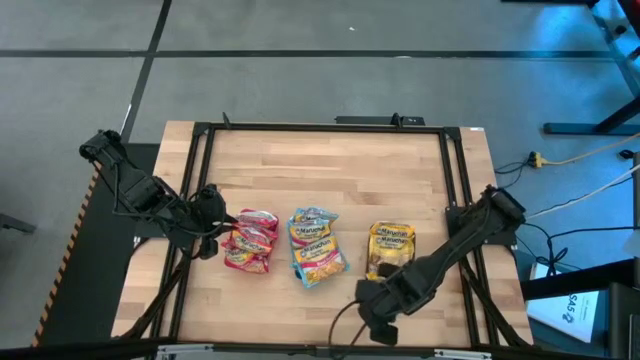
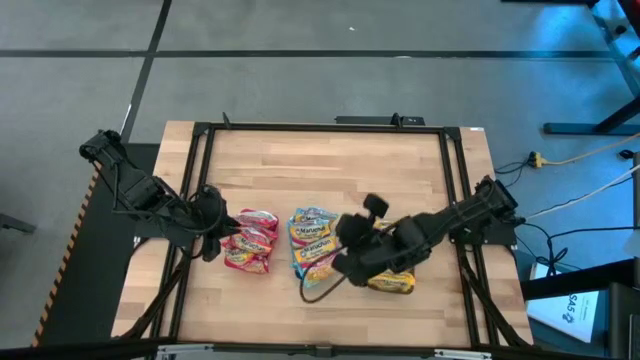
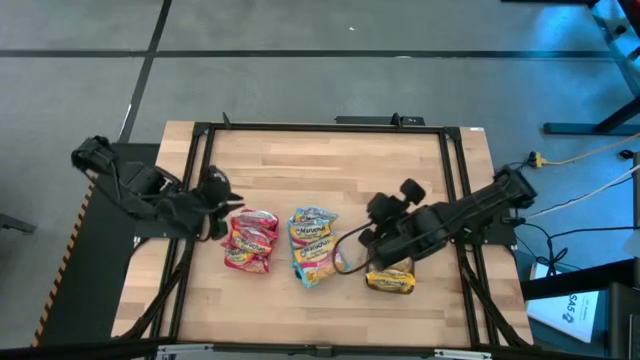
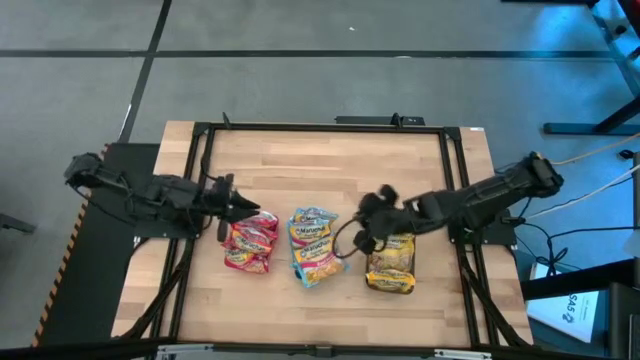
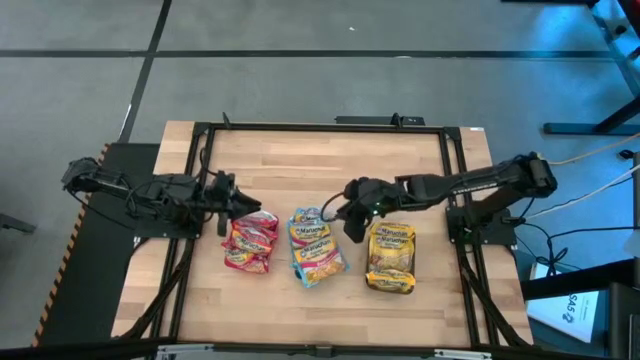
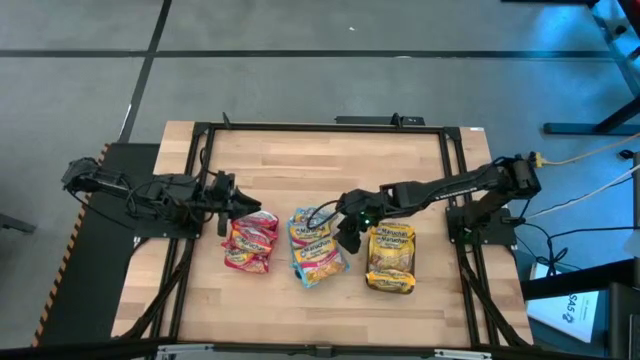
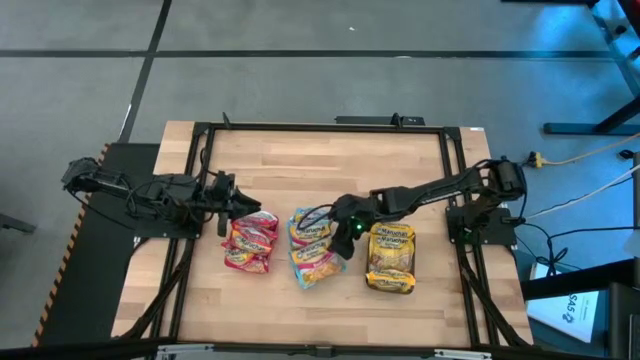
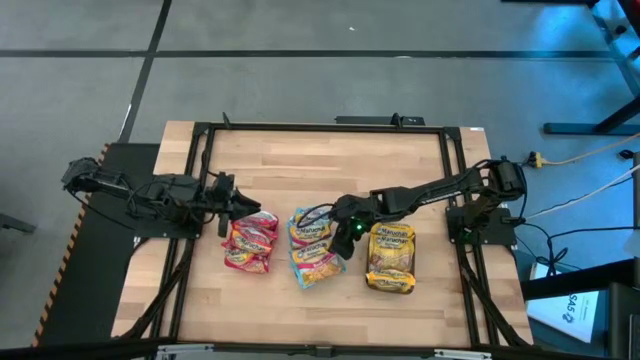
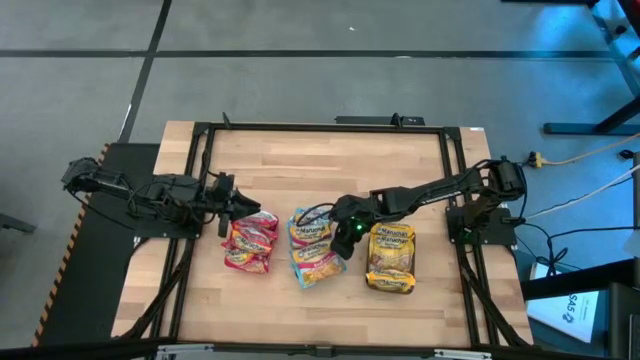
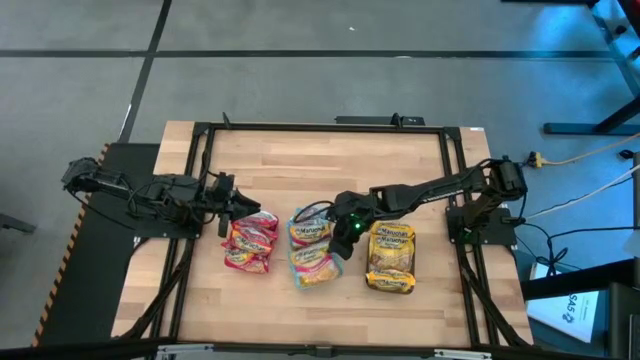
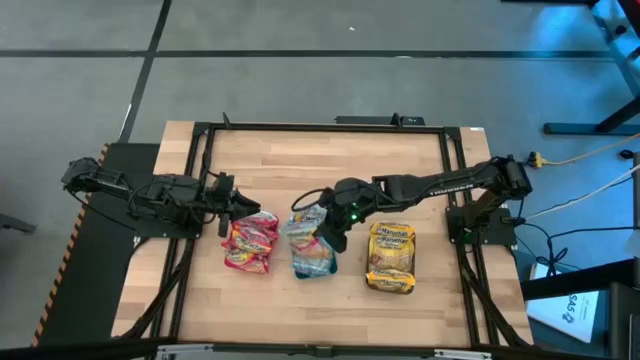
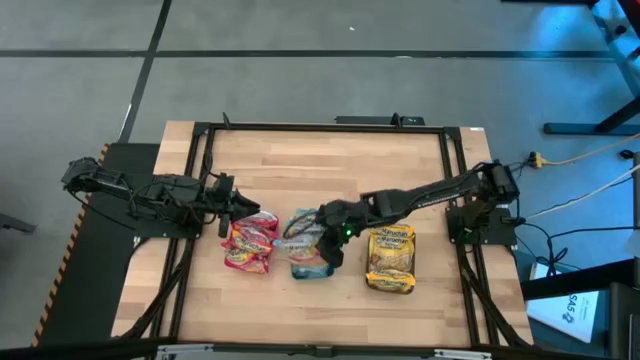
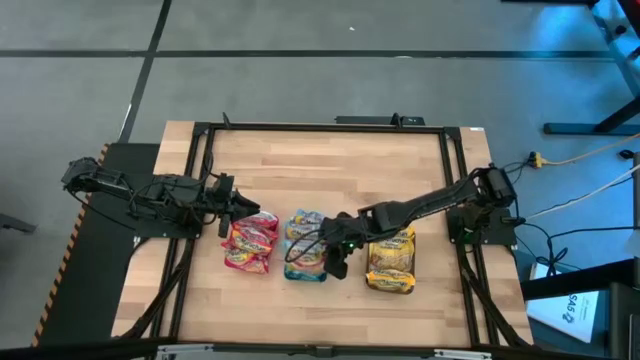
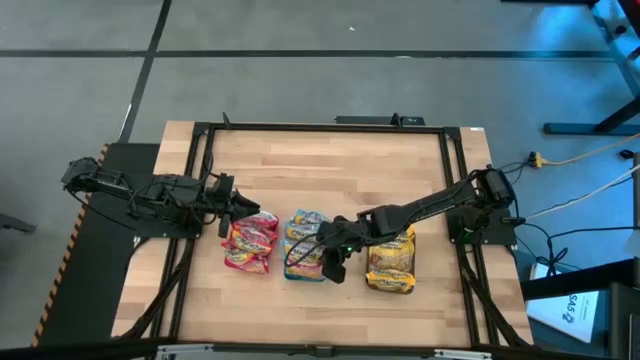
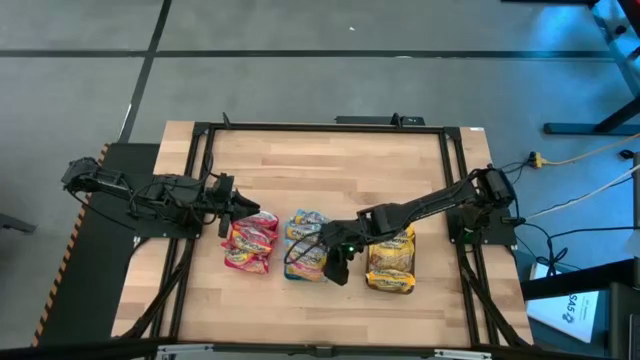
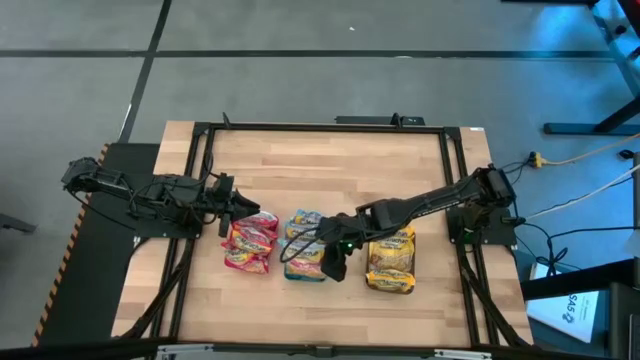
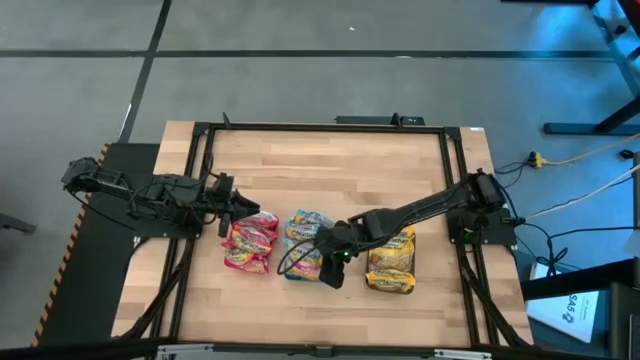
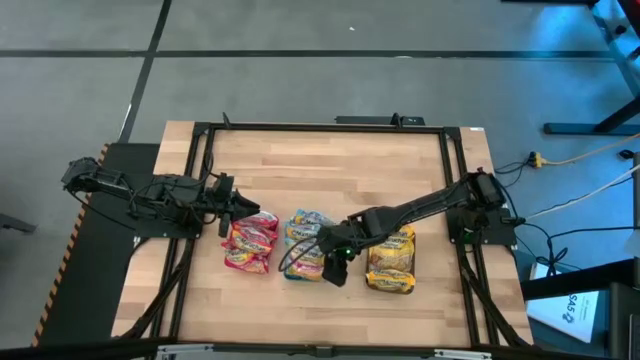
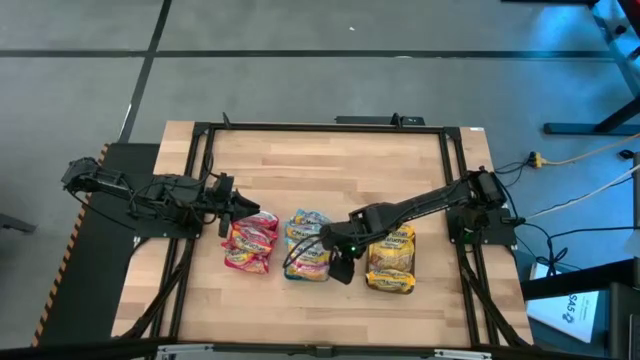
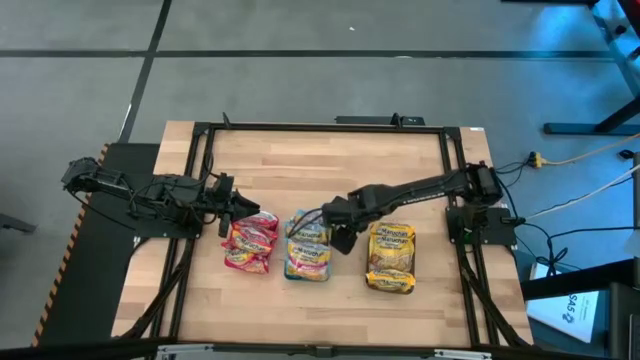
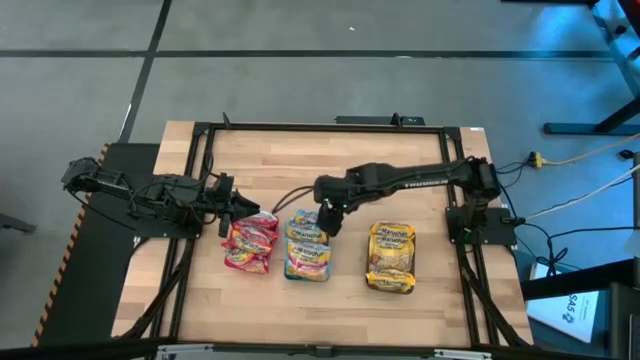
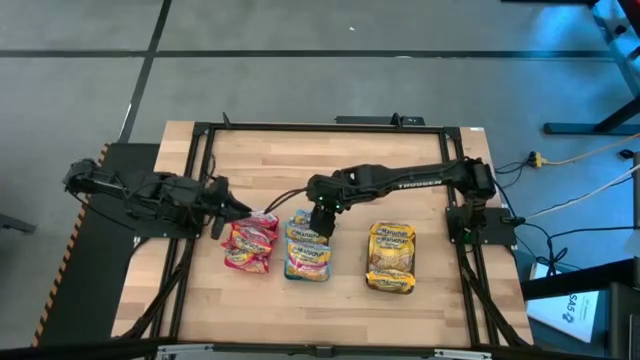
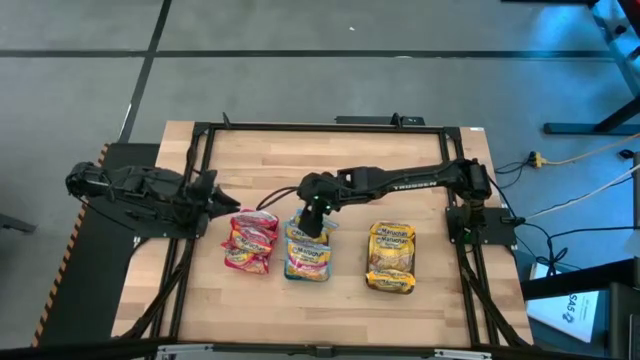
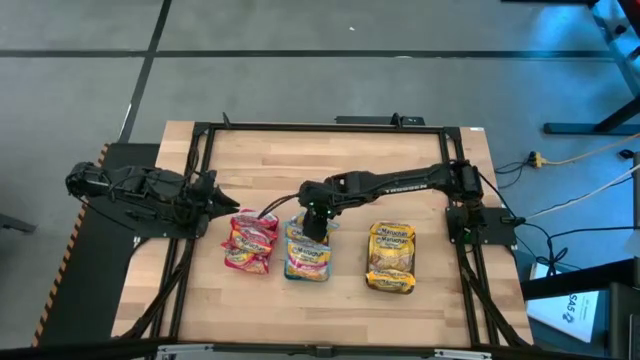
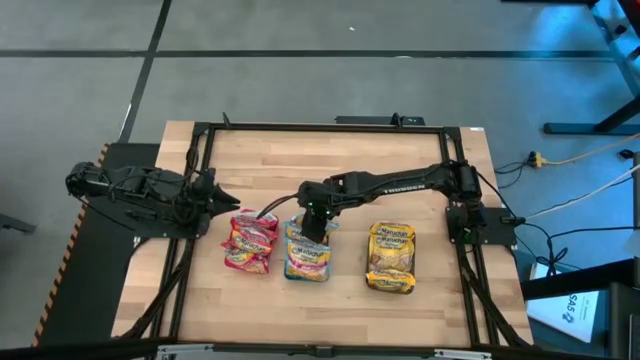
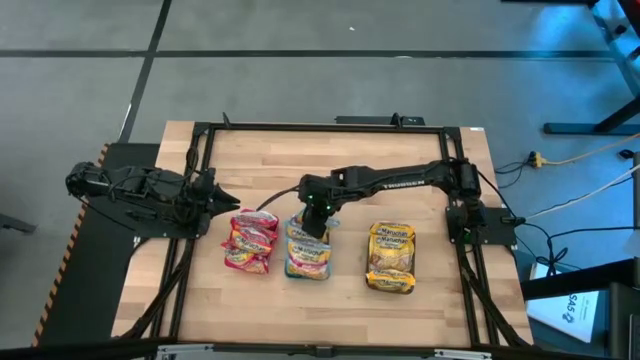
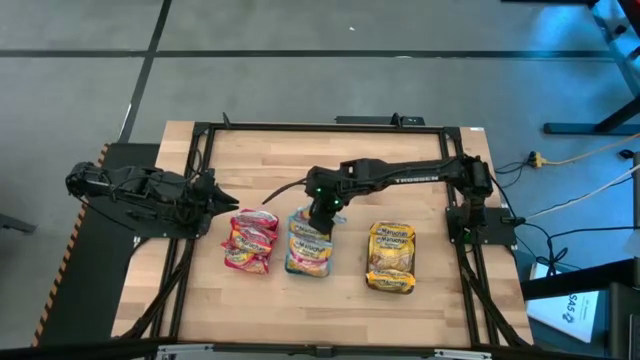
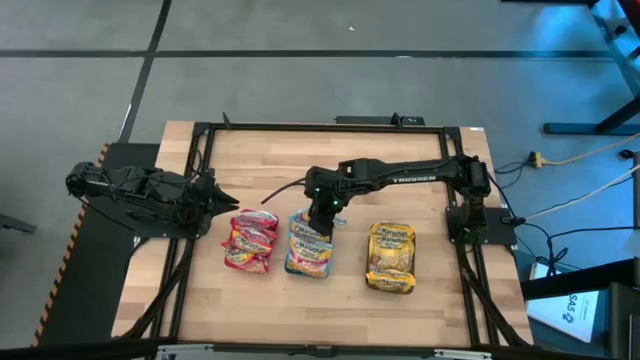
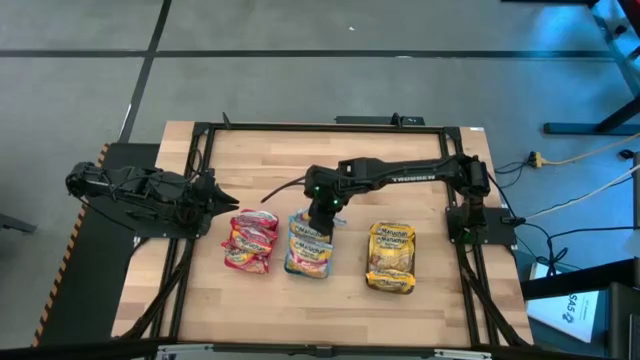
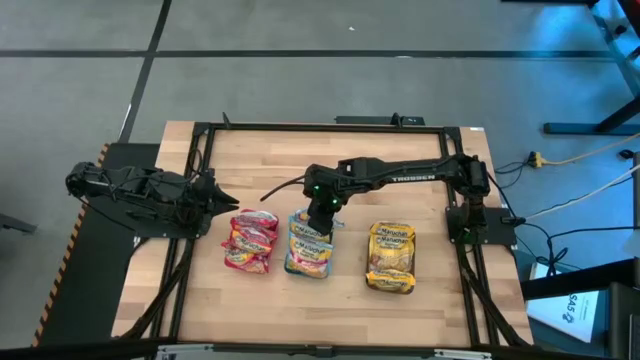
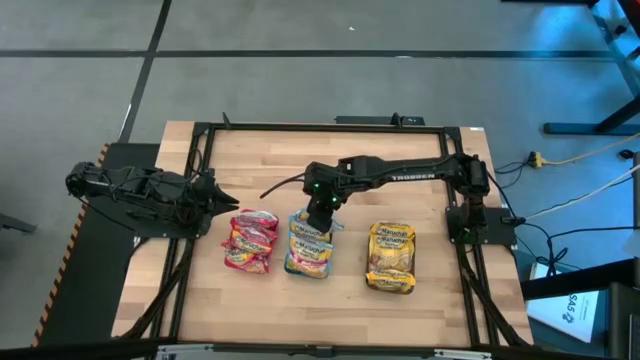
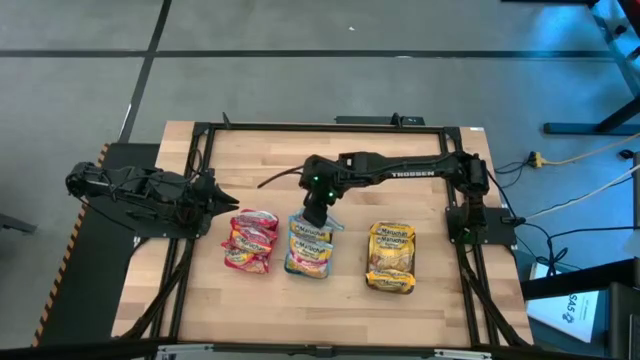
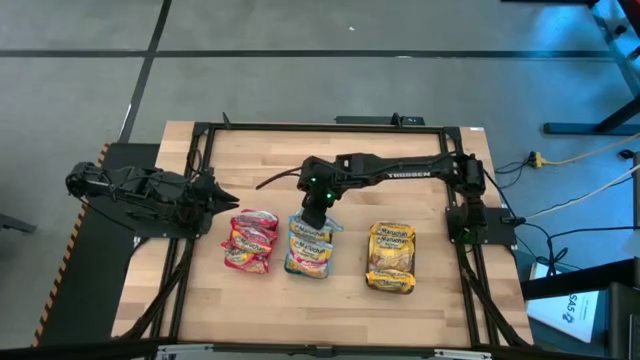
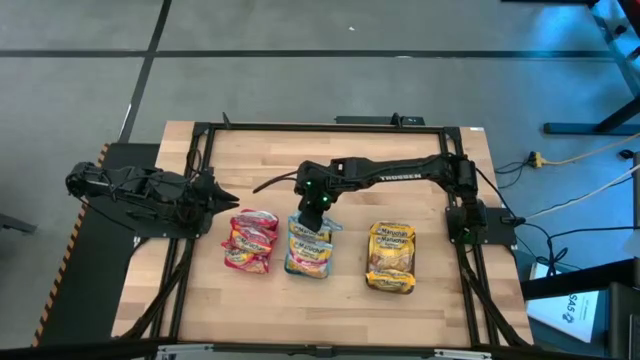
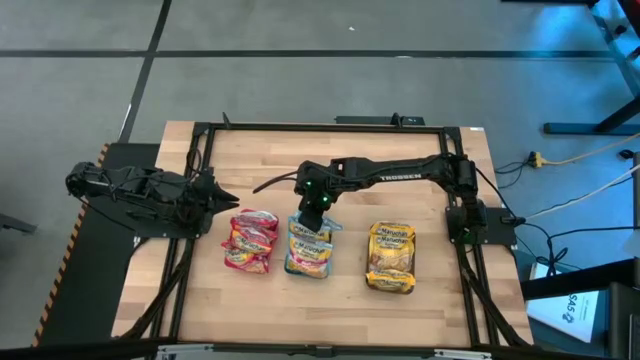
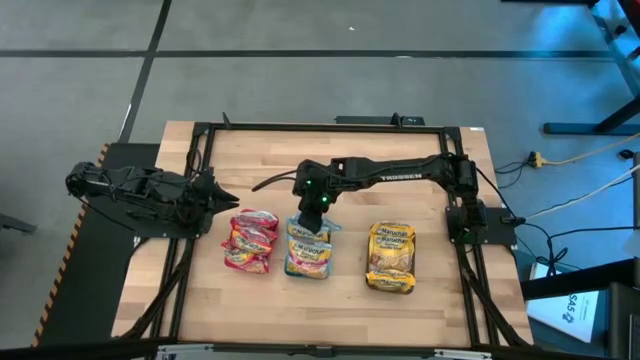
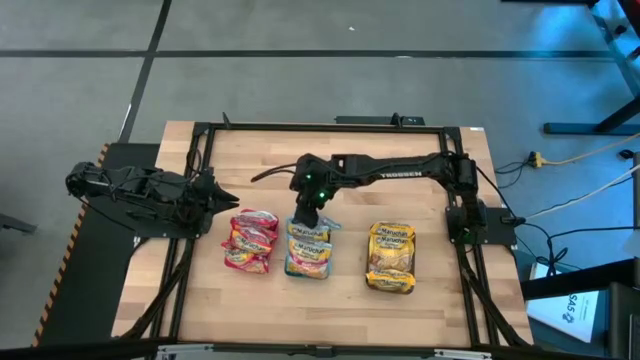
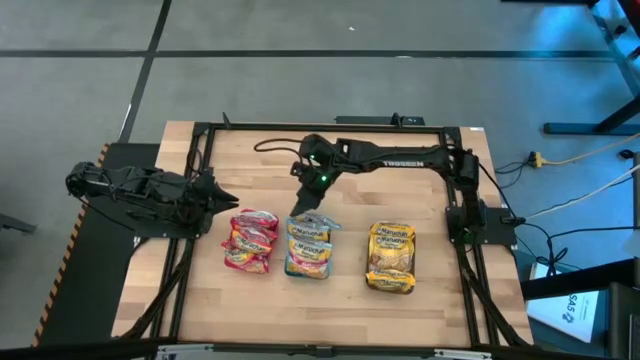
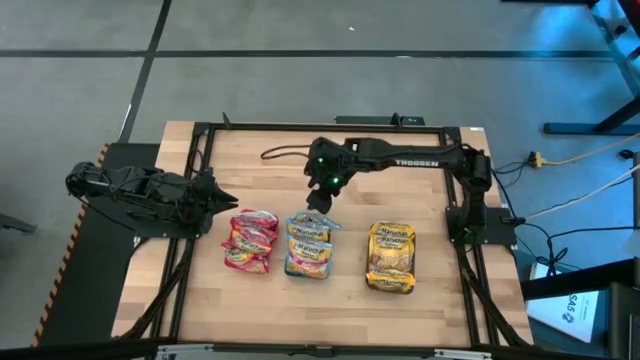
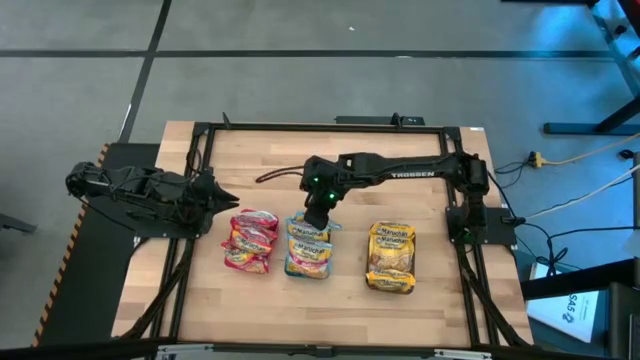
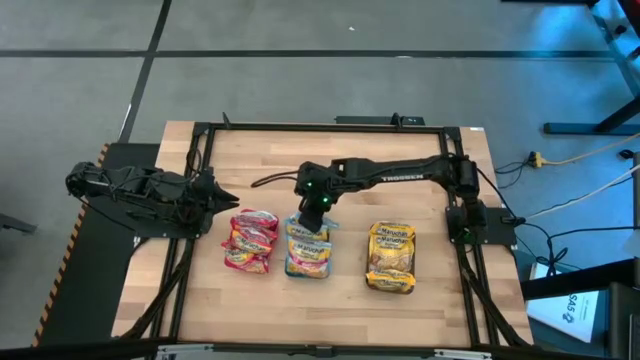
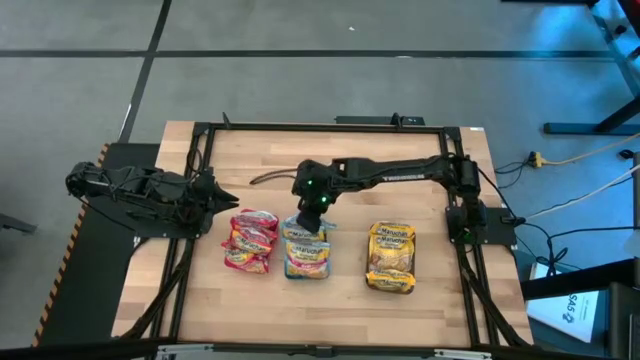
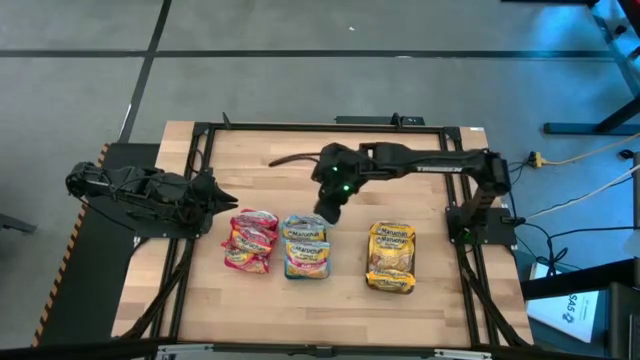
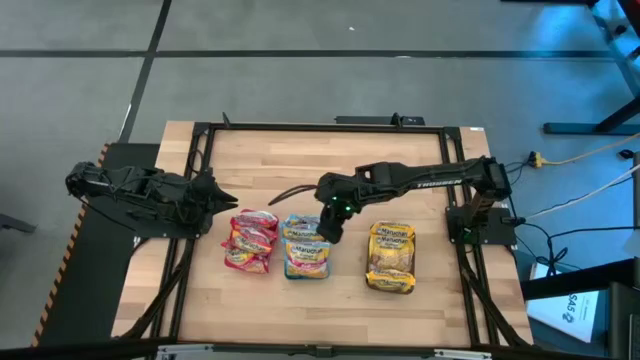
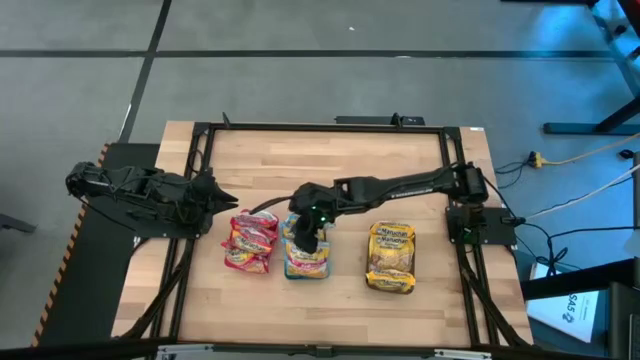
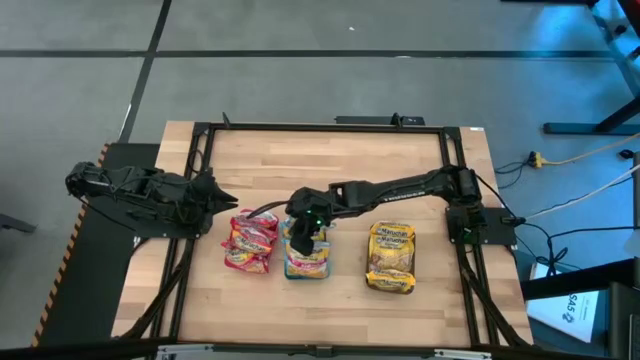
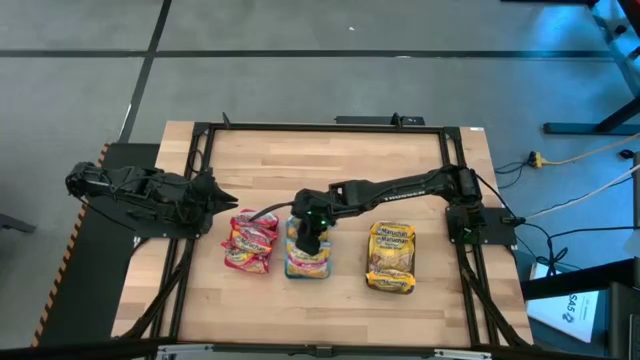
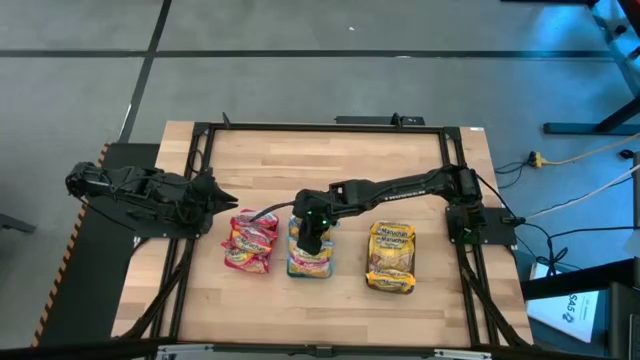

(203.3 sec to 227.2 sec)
Task: Sort Maruchan noodles
Adjust the blue noodle packs in the blue bin
